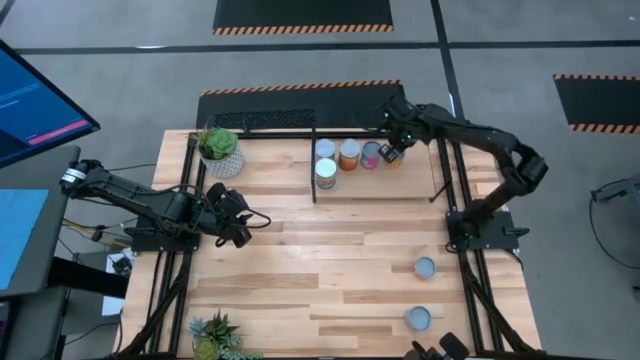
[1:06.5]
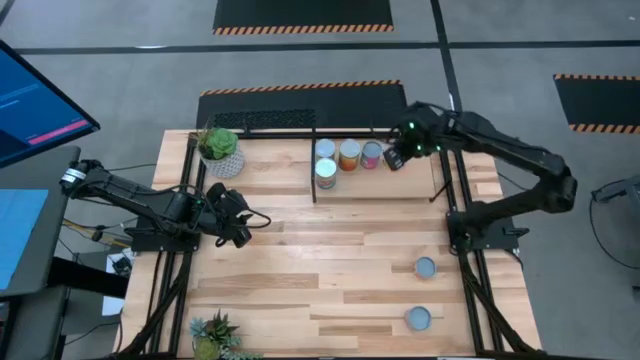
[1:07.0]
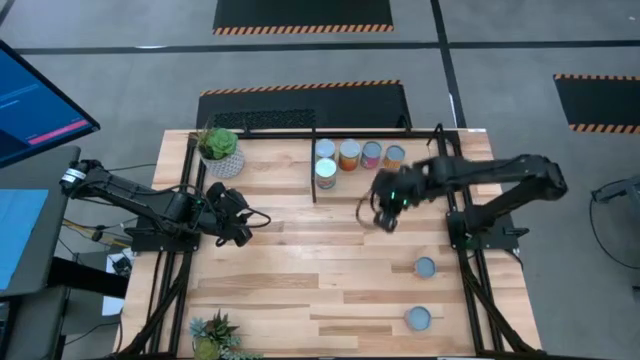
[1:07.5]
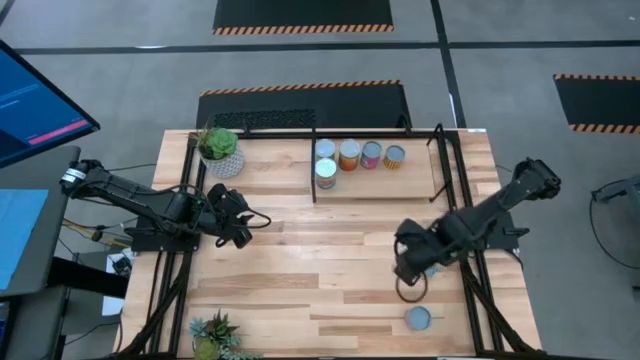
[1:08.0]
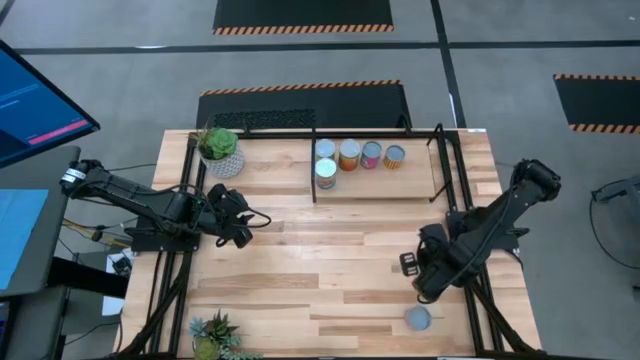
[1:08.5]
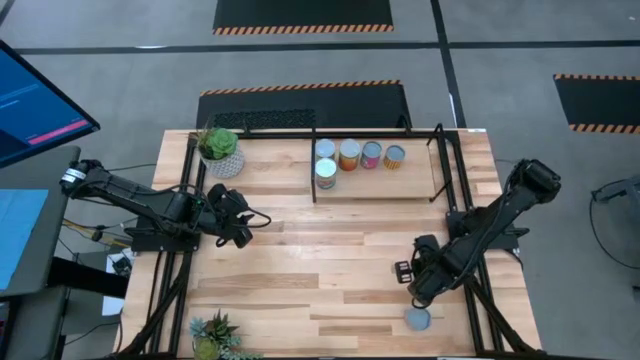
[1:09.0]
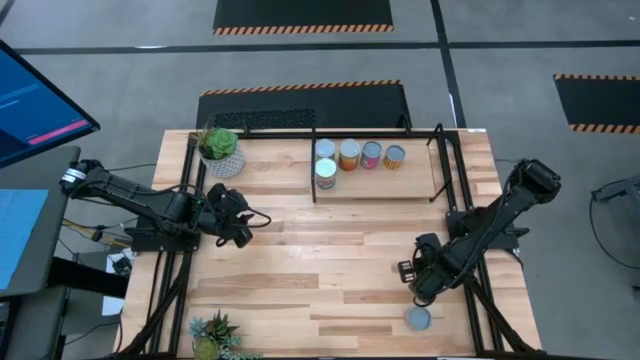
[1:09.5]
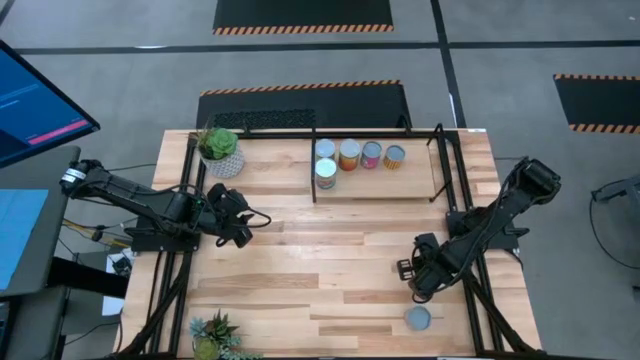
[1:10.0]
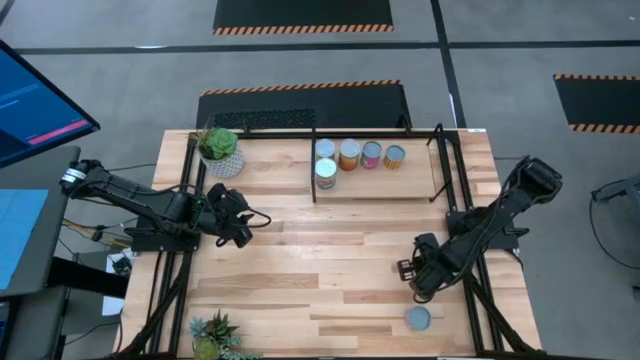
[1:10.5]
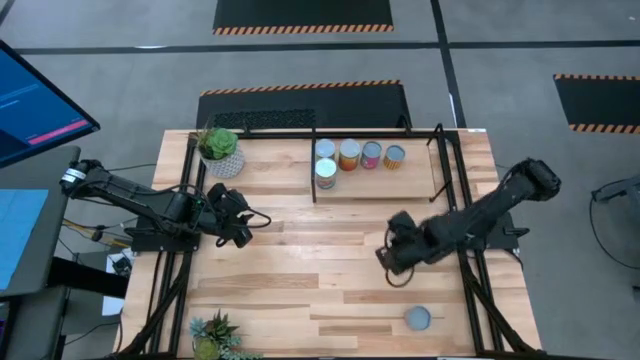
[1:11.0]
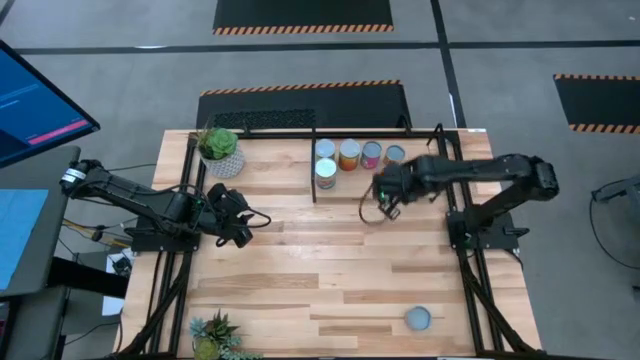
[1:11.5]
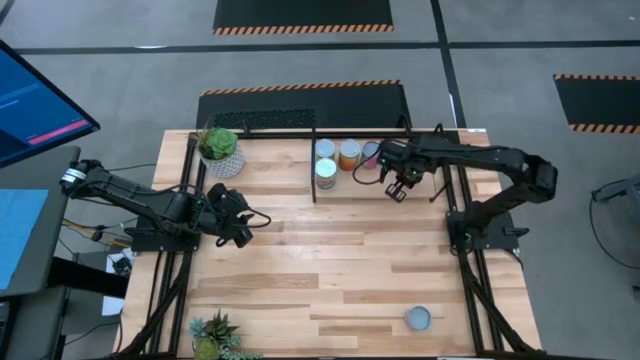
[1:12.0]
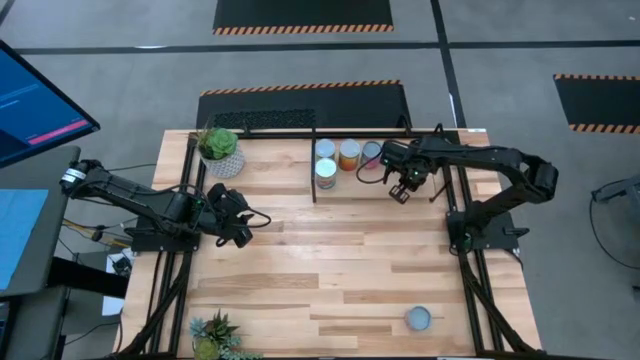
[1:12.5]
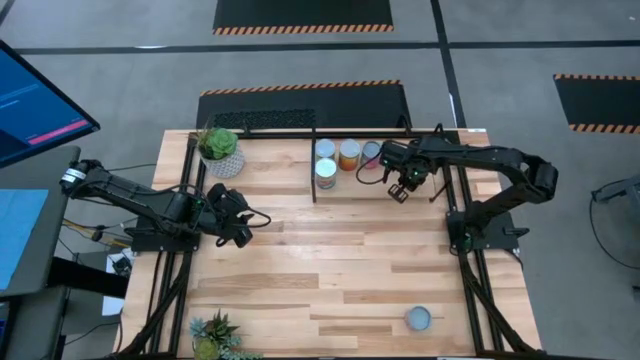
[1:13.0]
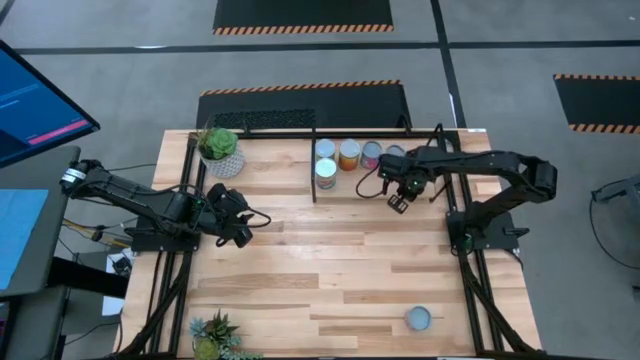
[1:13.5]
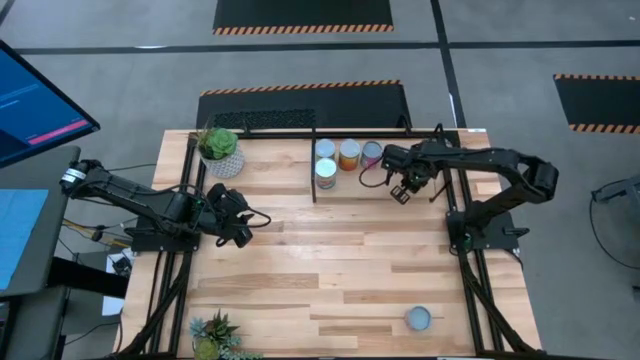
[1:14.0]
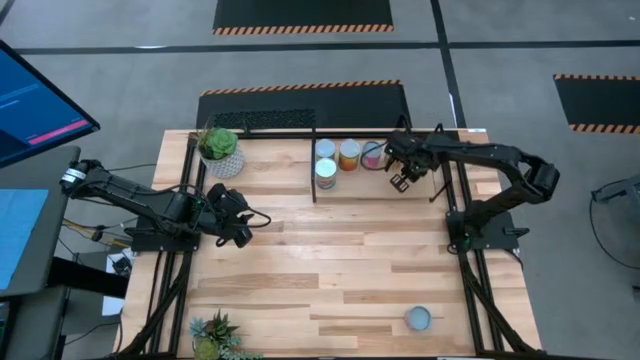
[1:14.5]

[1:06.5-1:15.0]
Task: Pick and place cans onto a shelf
Put the canned pineapple rings on the shelf

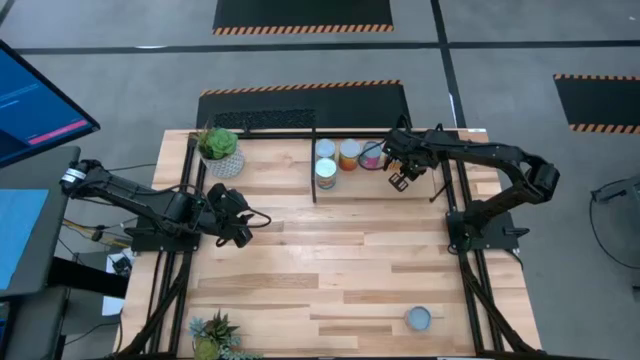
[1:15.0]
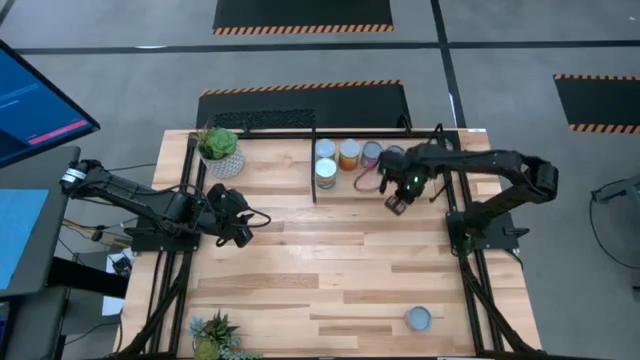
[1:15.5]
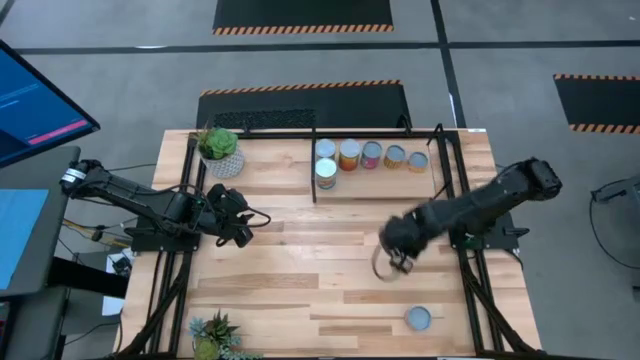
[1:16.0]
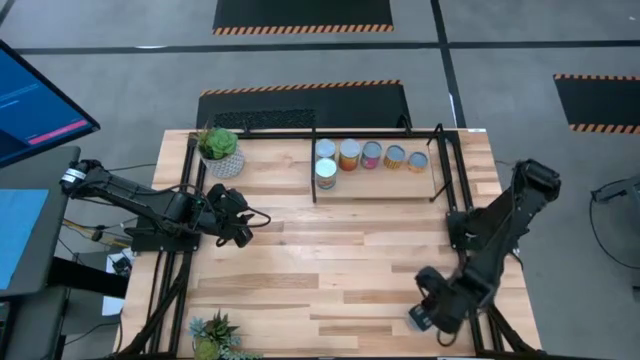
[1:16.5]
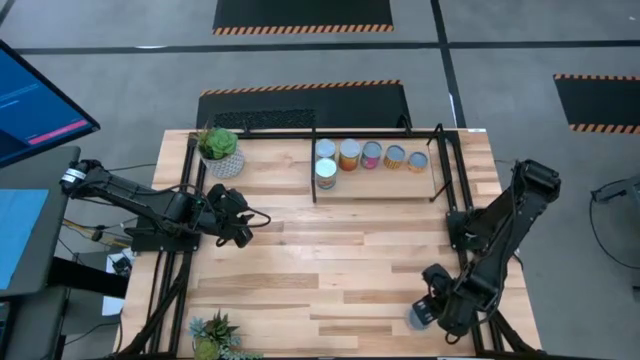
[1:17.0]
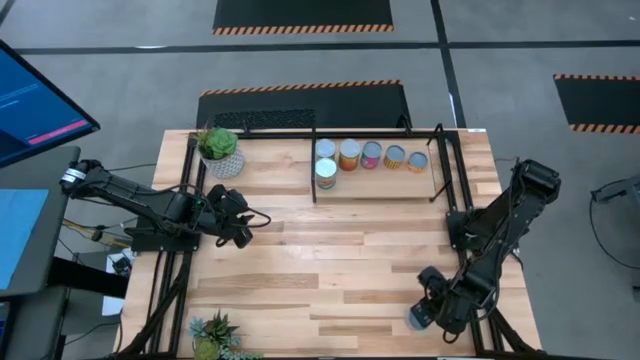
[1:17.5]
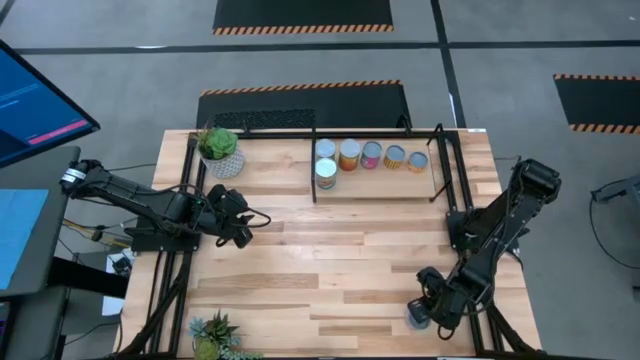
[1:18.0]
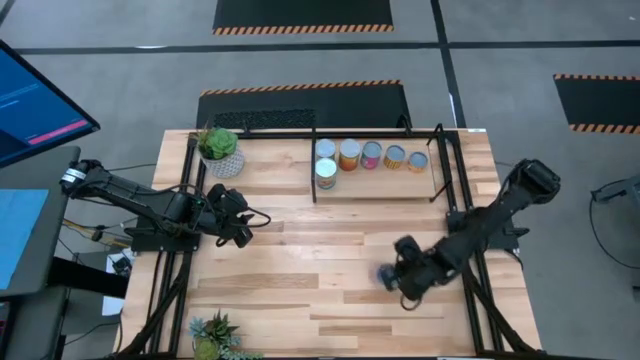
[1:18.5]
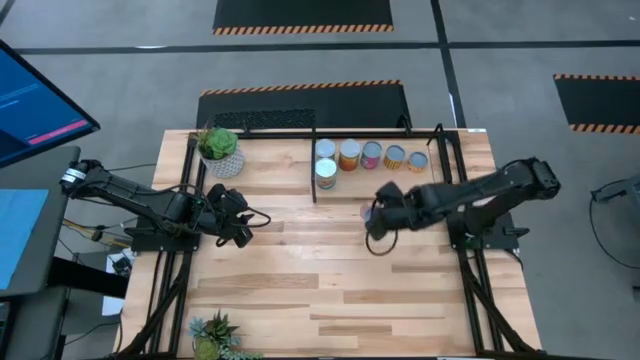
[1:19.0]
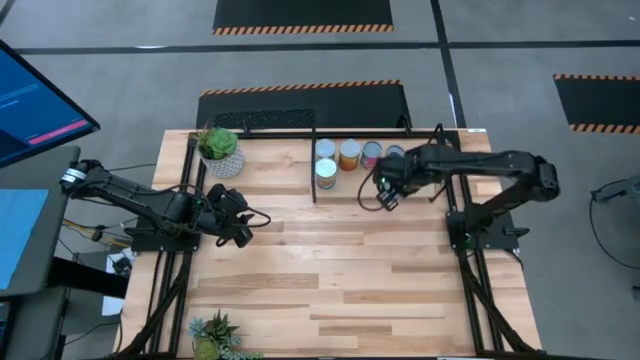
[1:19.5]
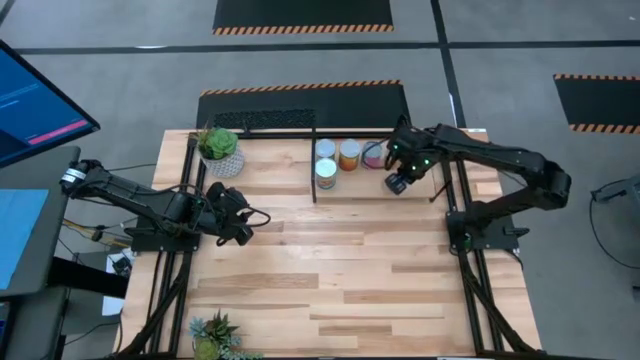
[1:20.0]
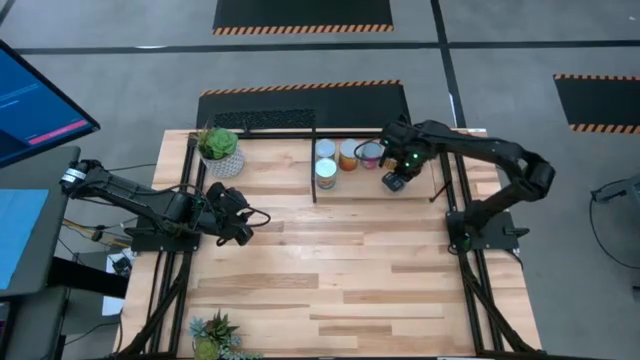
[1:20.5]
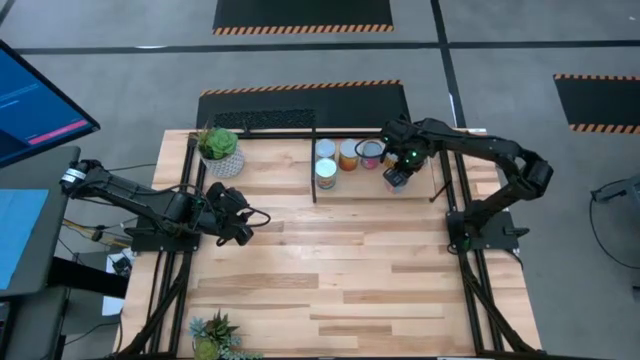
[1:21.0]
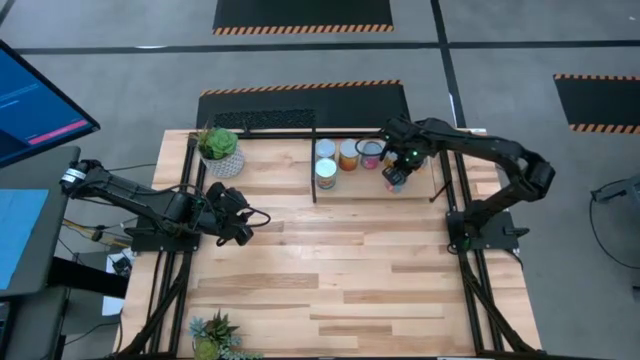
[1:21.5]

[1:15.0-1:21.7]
Put the canned corn on the shelf

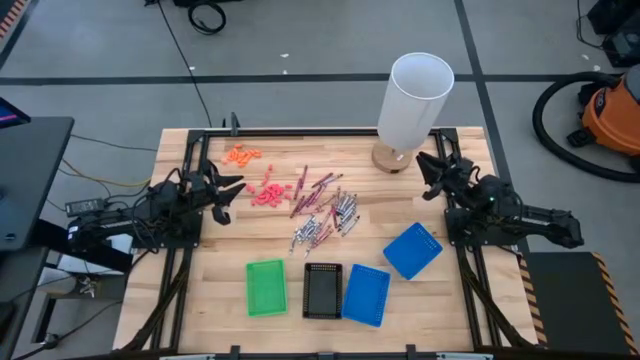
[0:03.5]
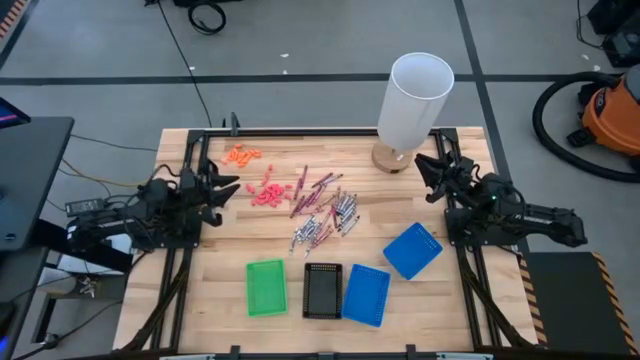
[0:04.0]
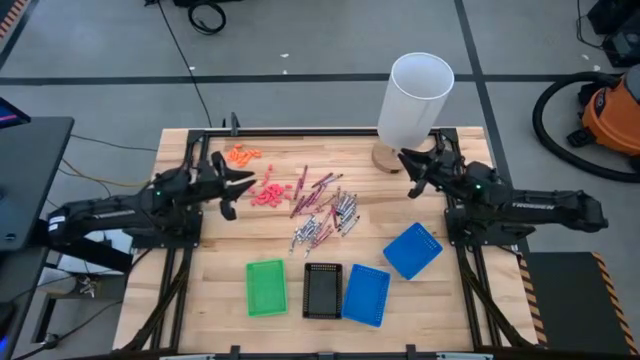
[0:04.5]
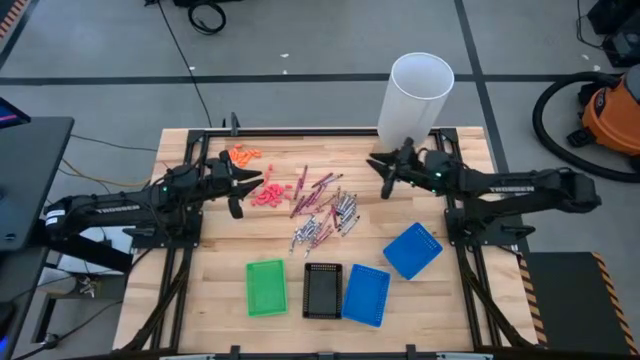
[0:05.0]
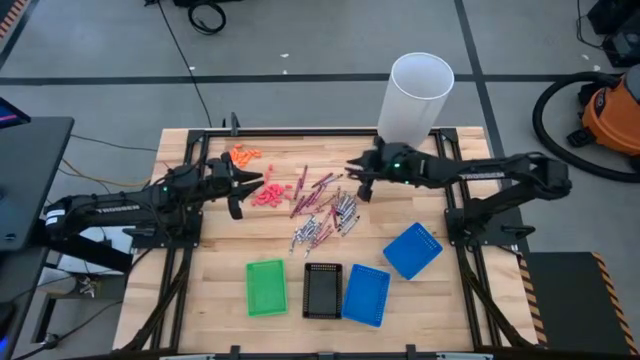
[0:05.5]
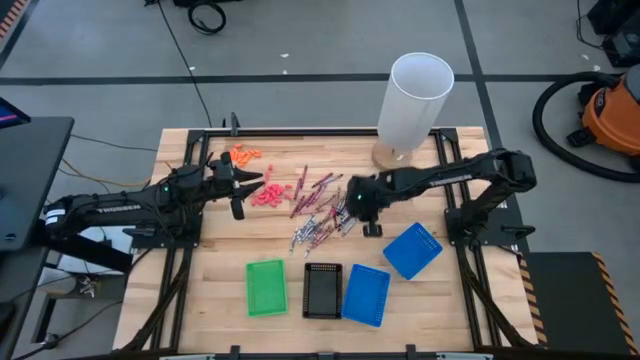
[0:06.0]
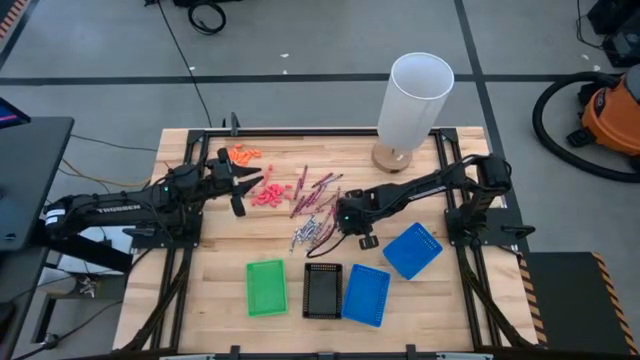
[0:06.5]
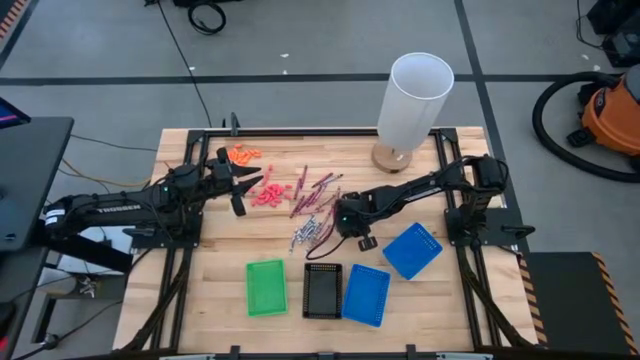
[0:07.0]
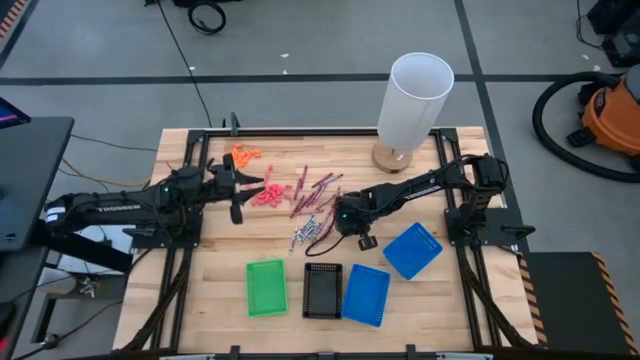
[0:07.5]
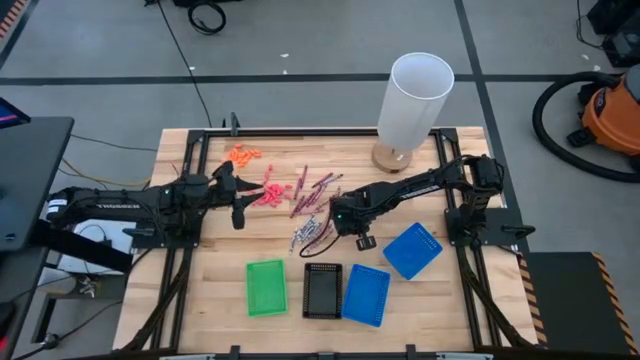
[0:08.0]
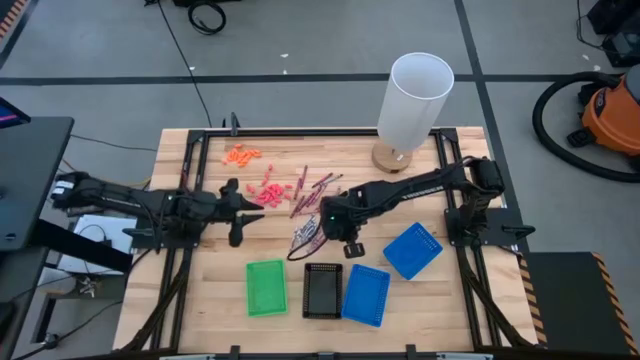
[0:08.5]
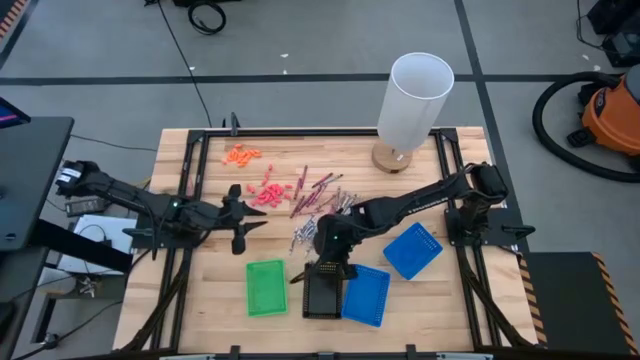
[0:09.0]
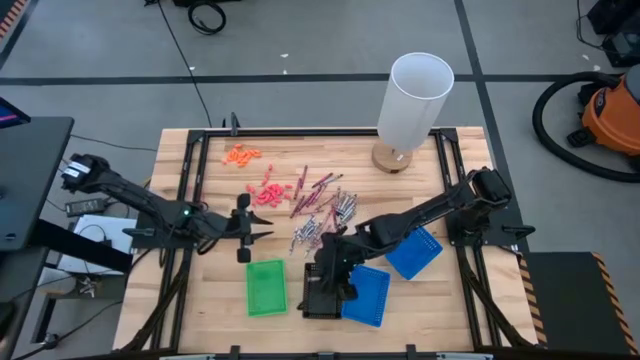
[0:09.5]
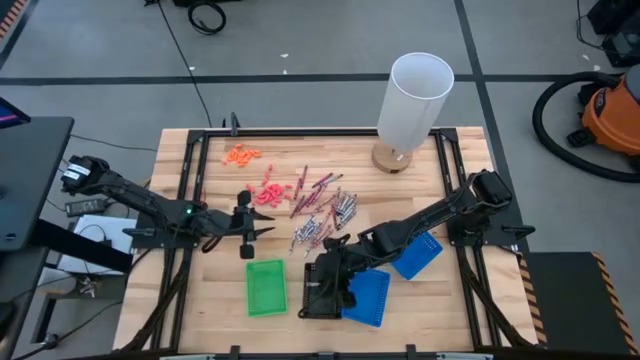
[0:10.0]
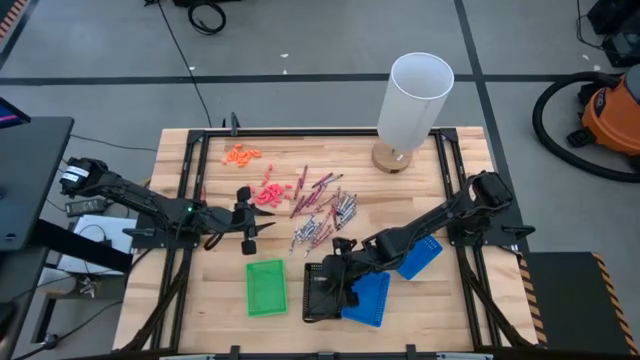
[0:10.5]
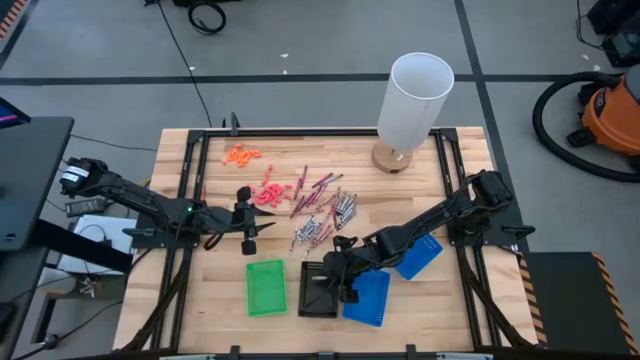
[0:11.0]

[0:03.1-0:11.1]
Task: Sort crayons
Put the black crayon into the black basket
